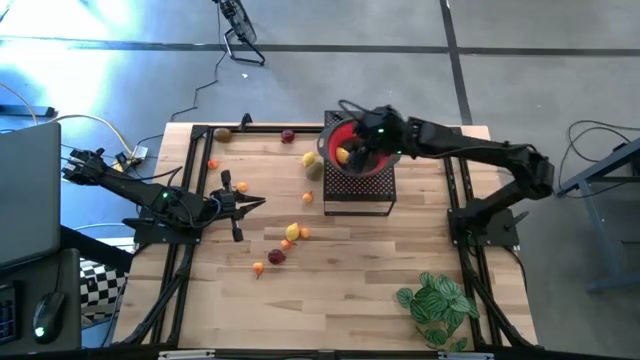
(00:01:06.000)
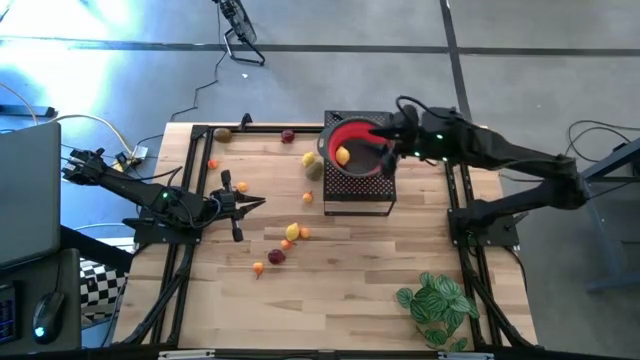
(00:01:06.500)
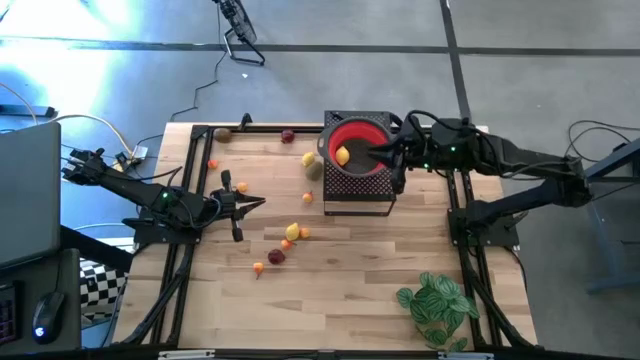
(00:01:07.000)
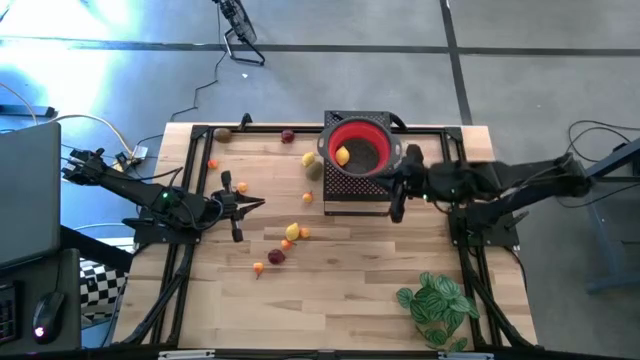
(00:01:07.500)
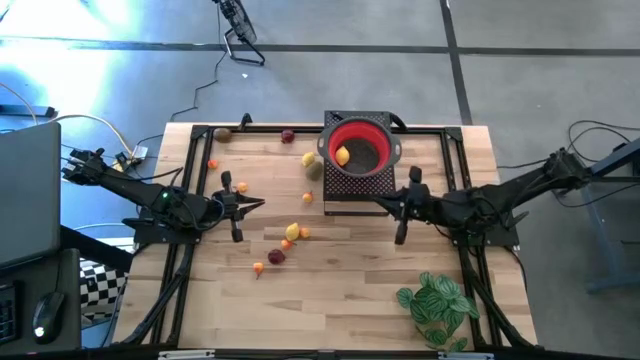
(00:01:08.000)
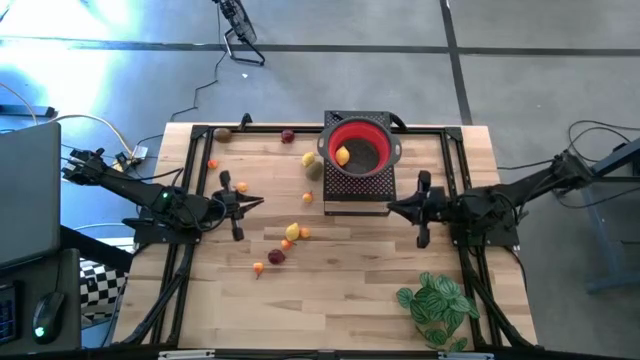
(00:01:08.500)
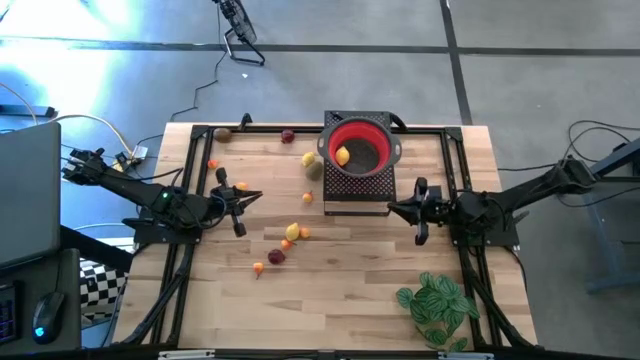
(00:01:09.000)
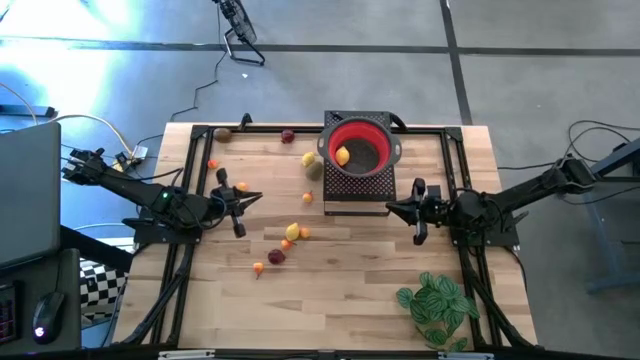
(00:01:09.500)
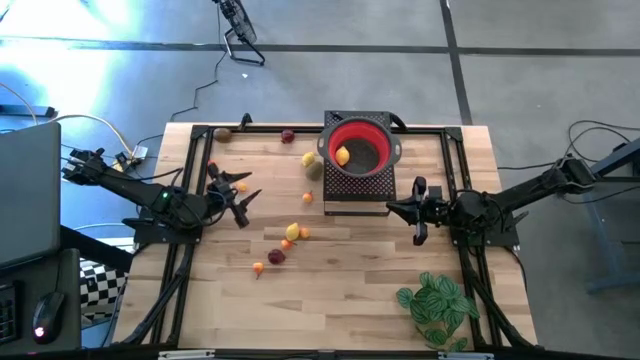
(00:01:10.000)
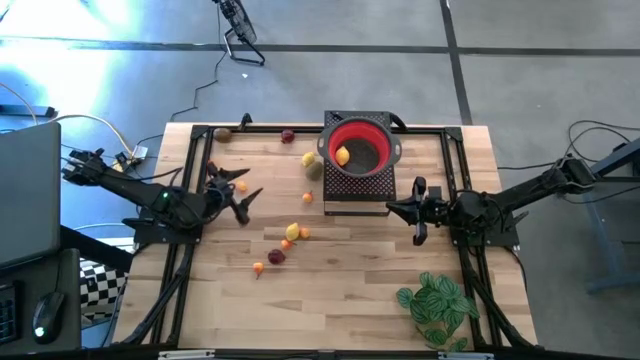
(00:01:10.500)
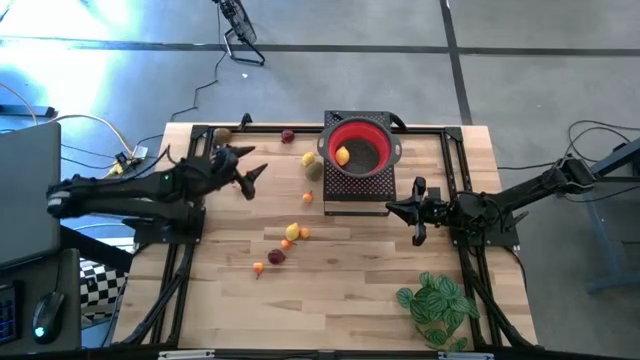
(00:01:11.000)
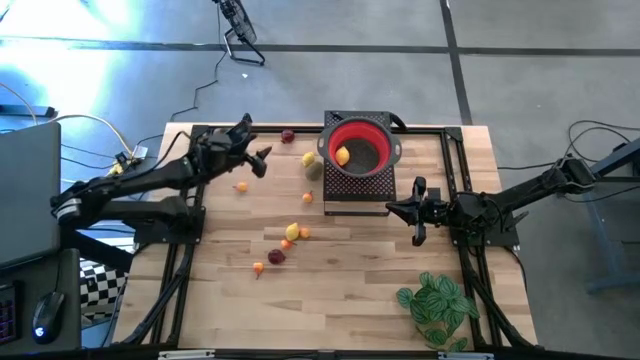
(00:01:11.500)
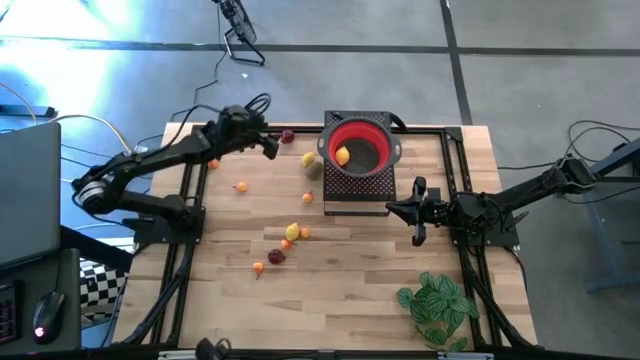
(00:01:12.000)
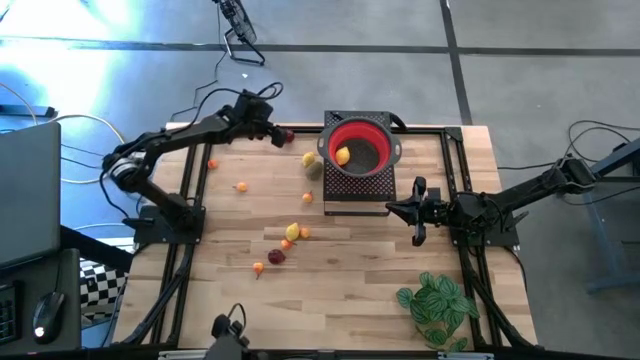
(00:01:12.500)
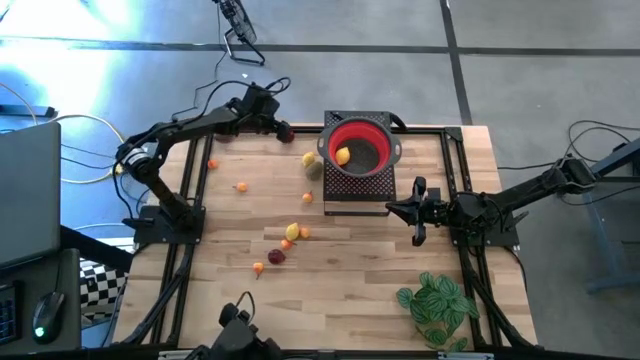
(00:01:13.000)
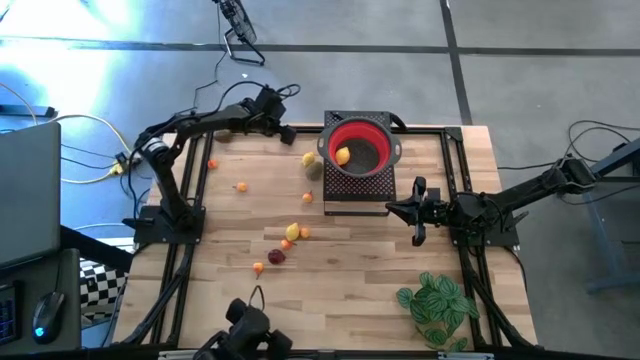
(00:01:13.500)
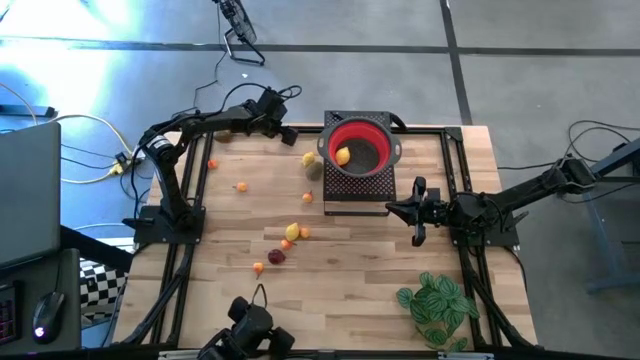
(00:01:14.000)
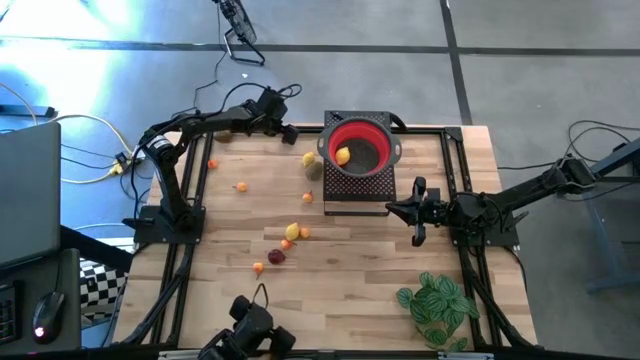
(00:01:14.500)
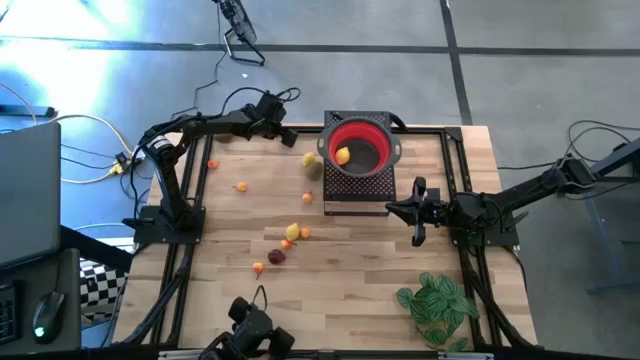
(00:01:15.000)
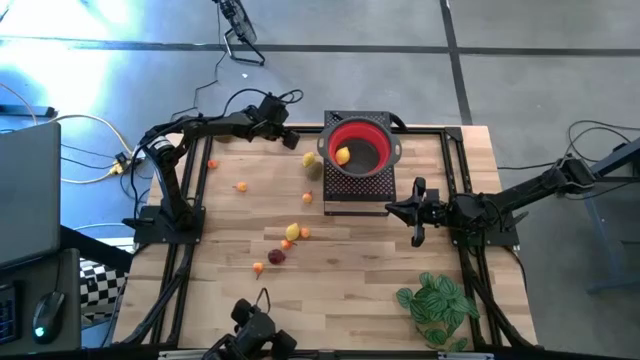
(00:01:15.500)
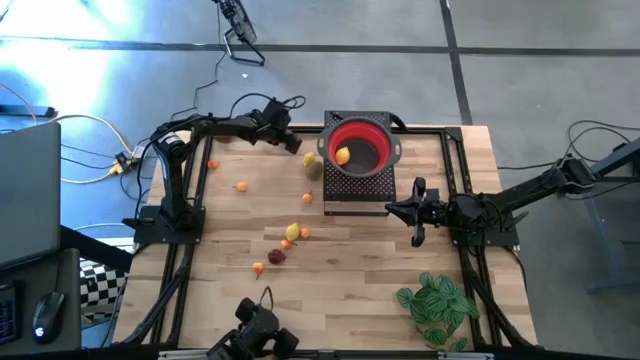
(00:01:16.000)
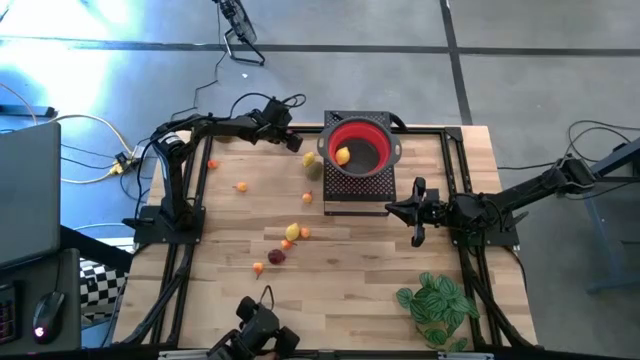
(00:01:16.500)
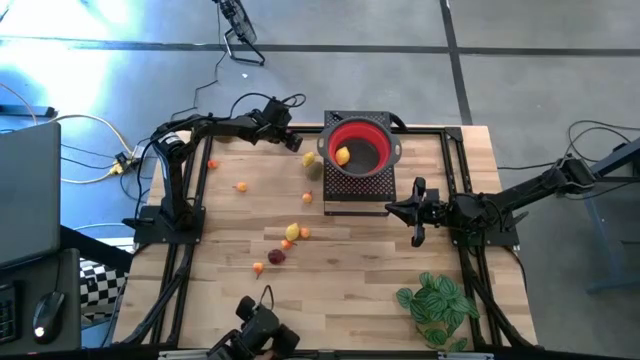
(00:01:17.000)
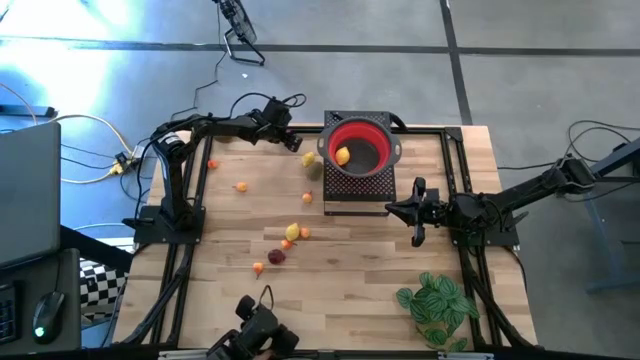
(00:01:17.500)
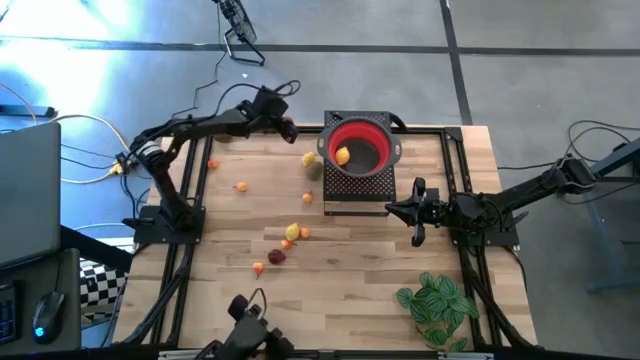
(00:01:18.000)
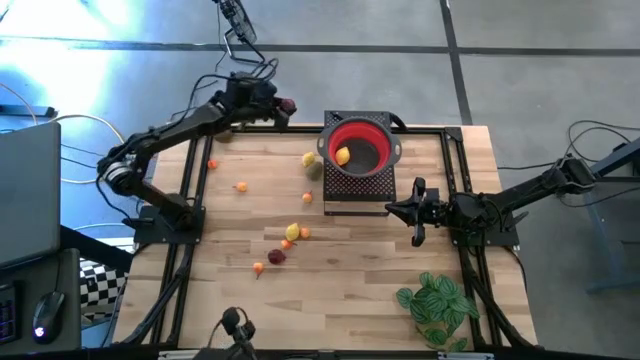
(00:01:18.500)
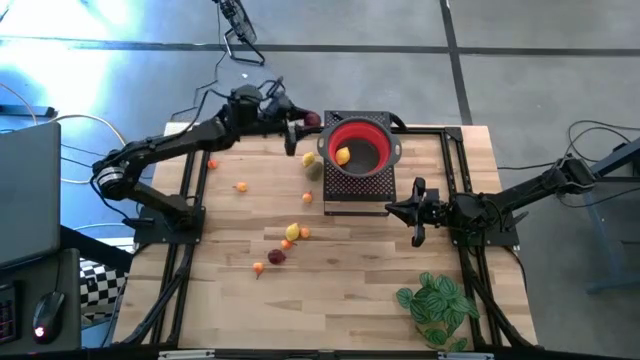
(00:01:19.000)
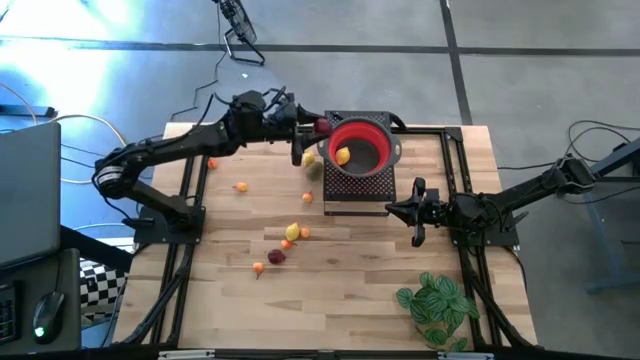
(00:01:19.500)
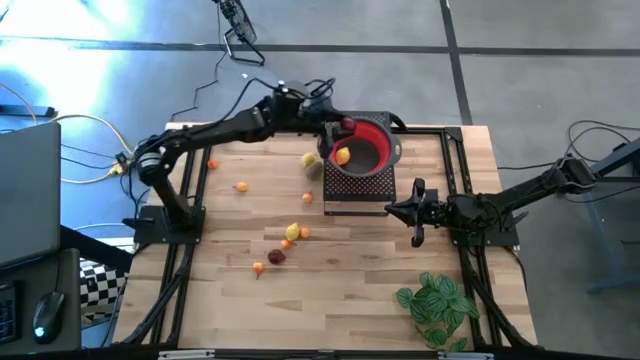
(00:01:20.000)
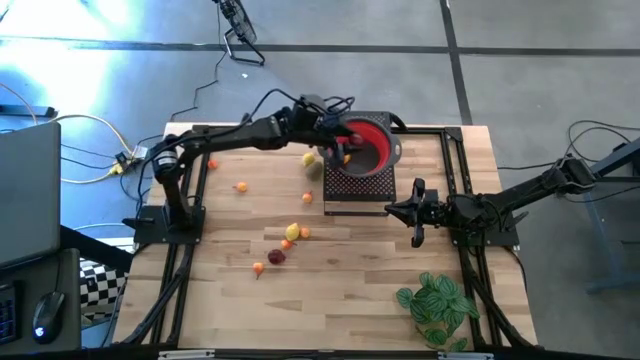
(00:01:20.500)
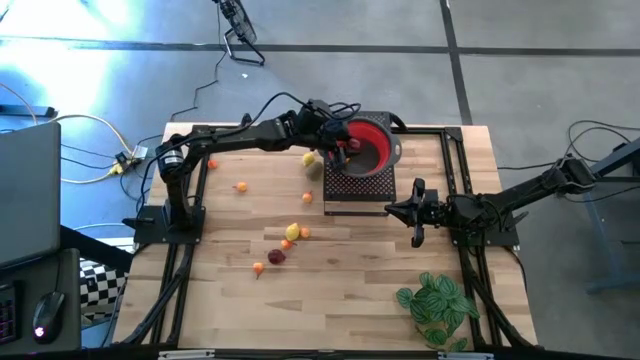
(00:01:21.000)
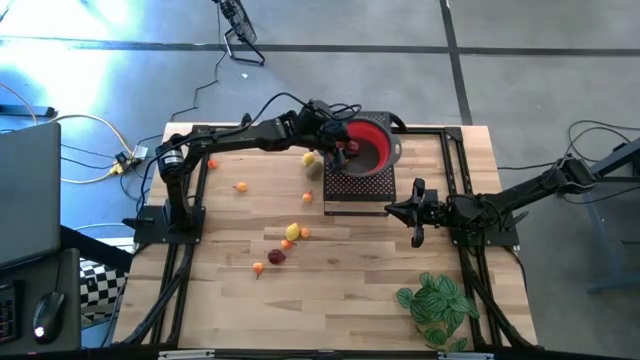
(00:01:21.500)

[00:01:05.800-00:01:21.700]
Task: Pick & Place Fruit
Put the top red pomegranate into the red strainer bowl on the shelf

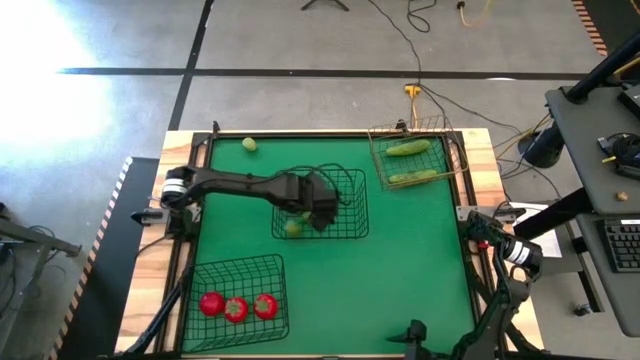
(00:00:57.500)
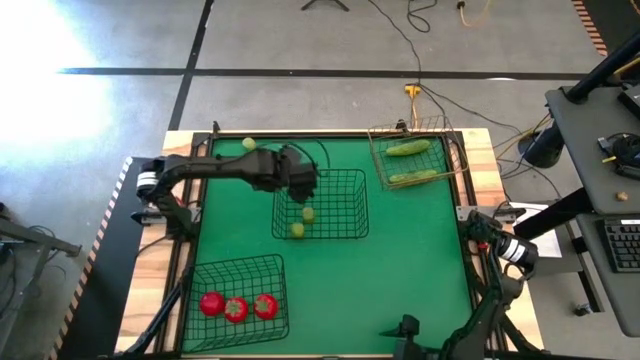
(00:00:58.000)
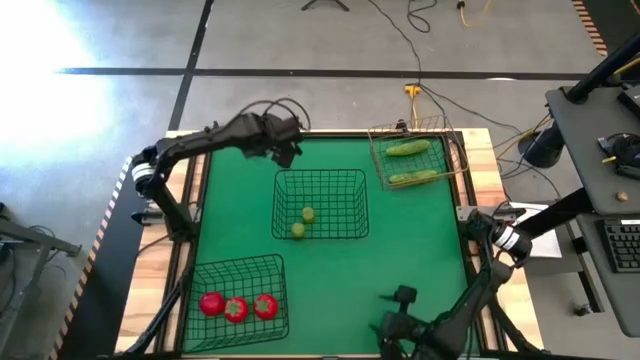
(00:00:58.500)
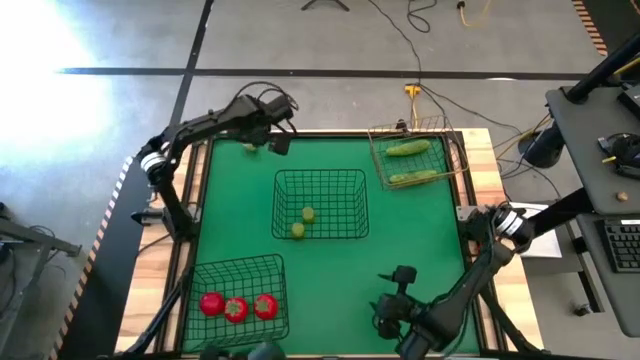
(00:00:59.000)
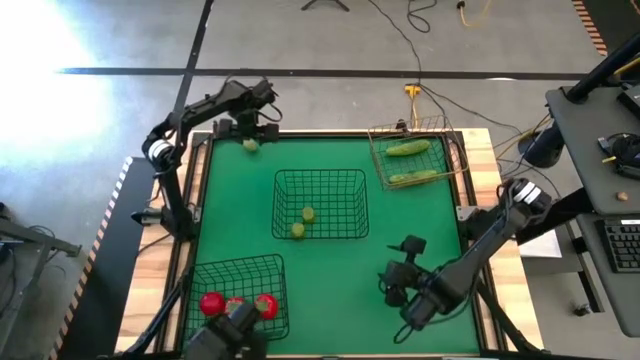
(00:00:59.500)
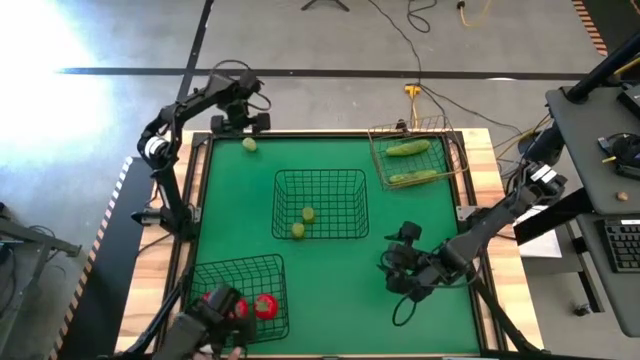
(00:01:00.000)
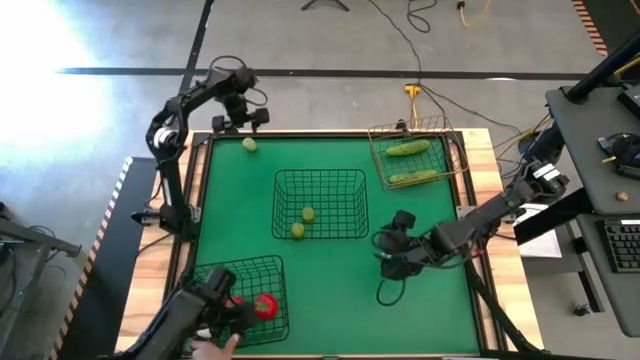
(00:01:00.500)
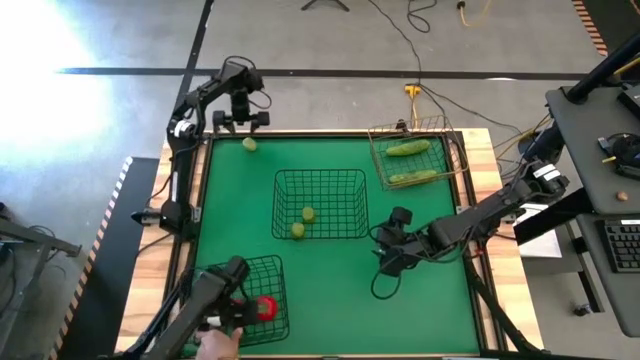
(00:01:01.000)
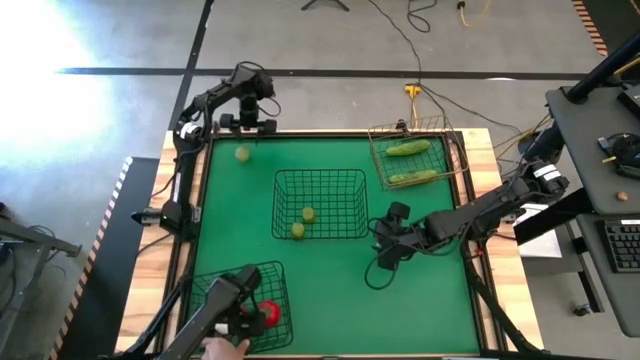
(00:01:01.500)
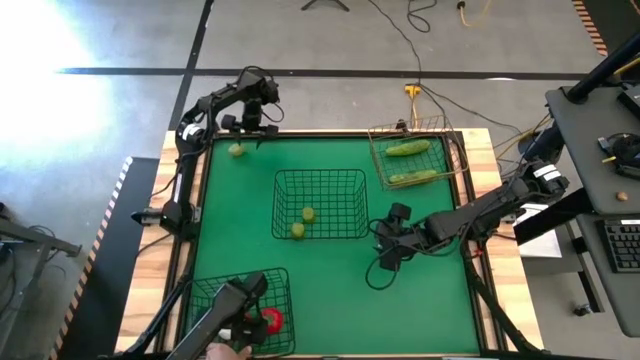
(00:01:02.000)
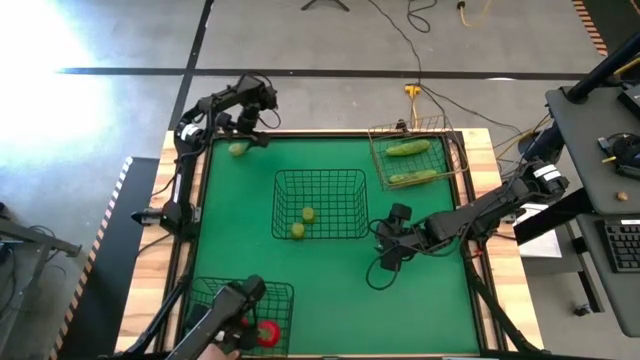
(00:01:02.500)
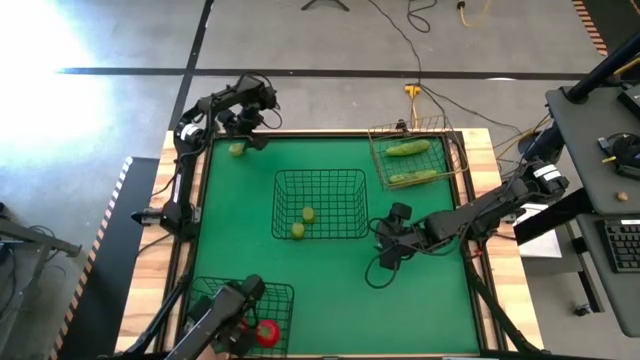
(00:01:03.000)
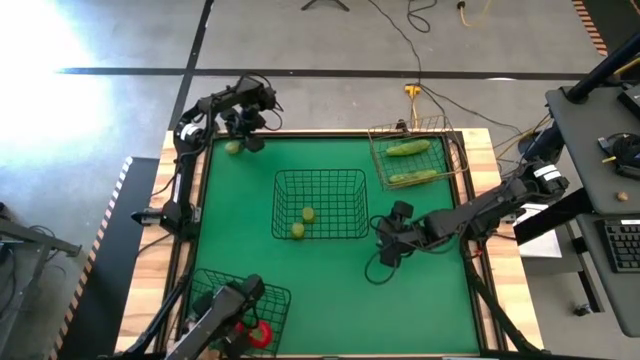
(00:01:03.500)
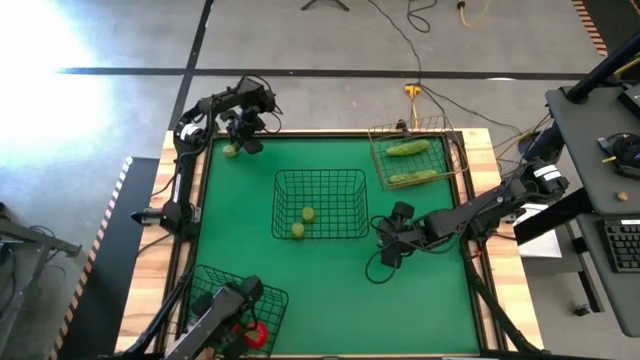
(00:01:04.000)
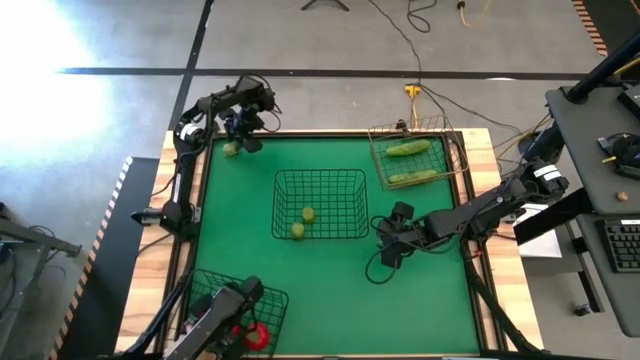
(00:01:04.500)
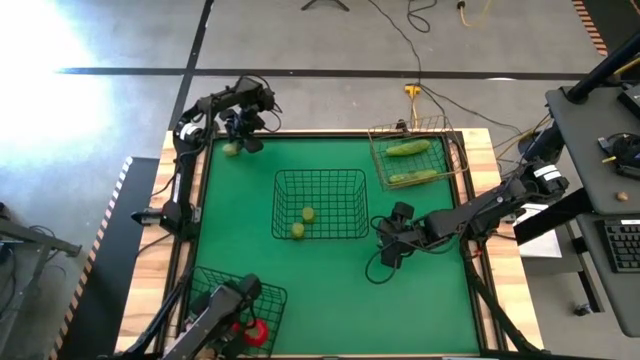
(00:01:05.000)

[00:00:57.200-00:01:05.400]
Task: Sort produce into baskets
Put the green lime into the top black wire basket
